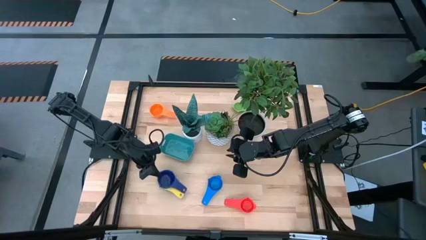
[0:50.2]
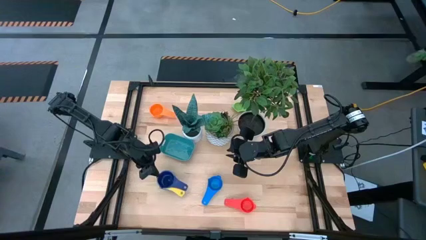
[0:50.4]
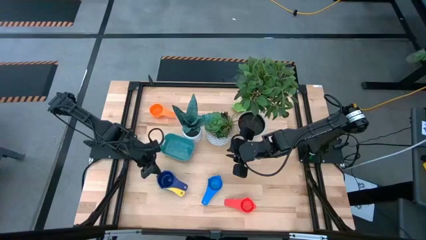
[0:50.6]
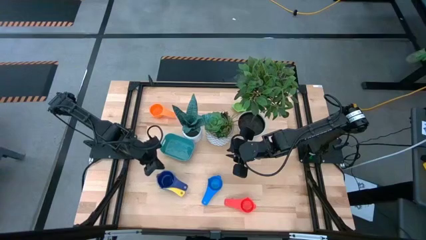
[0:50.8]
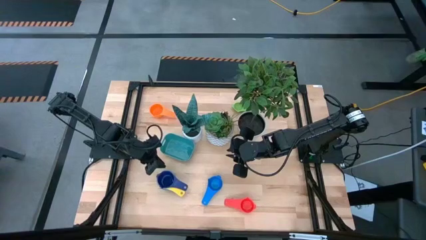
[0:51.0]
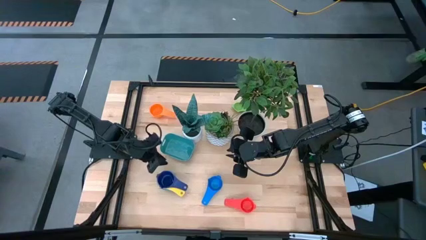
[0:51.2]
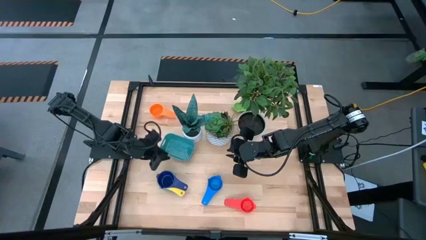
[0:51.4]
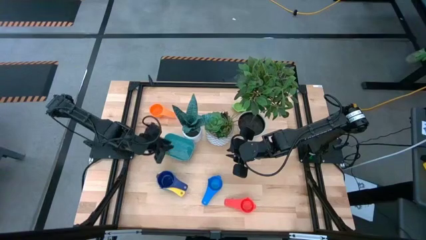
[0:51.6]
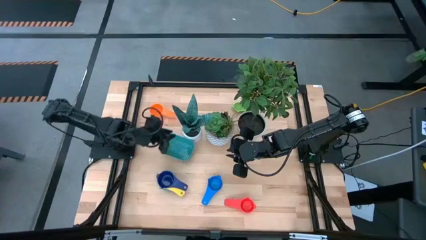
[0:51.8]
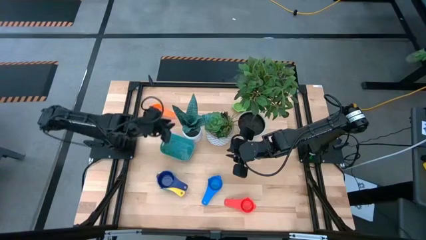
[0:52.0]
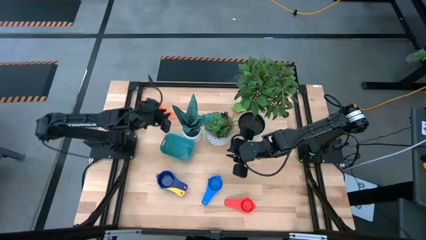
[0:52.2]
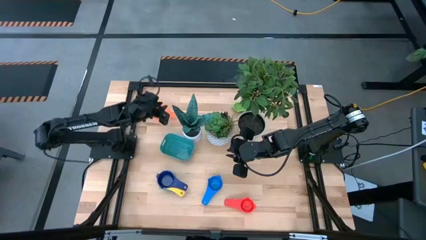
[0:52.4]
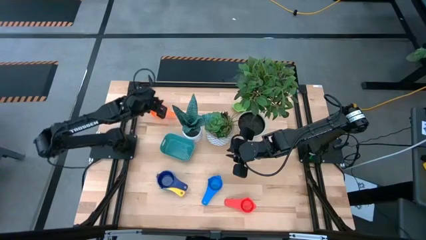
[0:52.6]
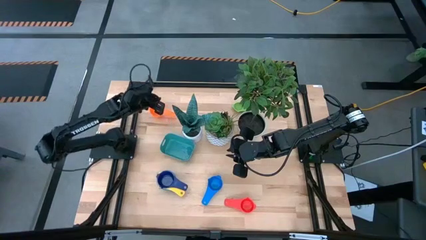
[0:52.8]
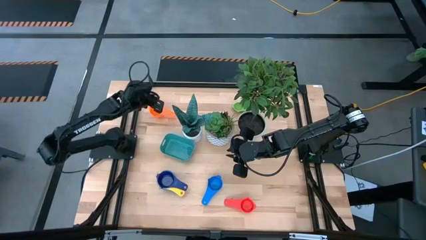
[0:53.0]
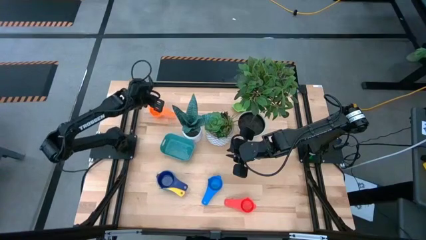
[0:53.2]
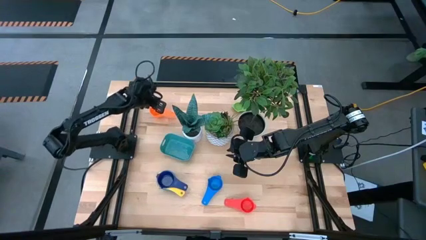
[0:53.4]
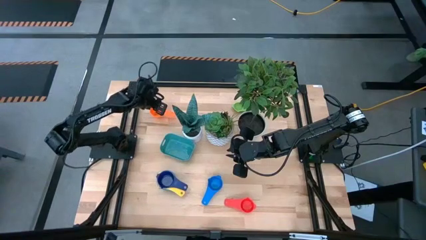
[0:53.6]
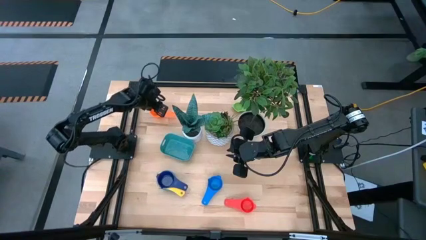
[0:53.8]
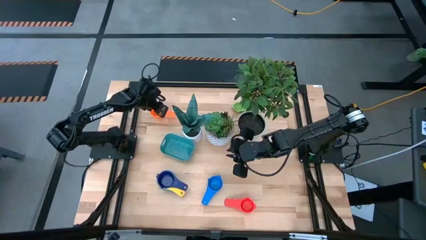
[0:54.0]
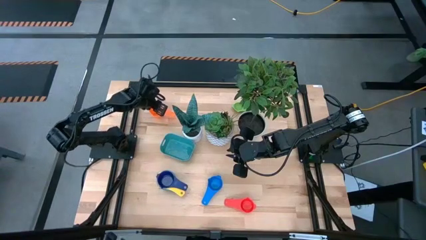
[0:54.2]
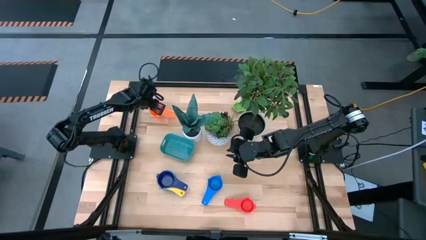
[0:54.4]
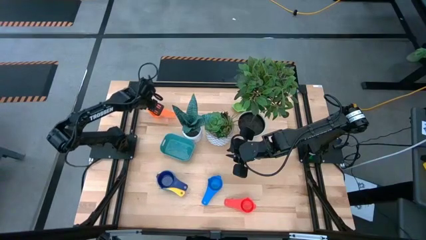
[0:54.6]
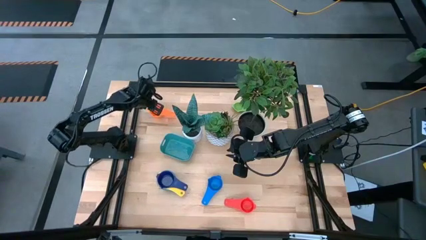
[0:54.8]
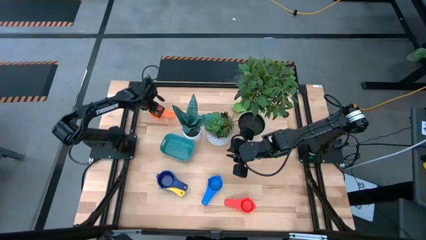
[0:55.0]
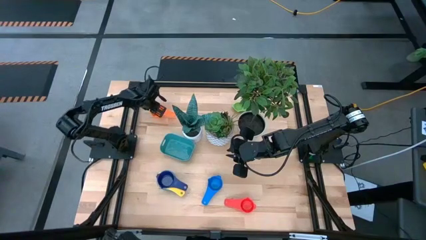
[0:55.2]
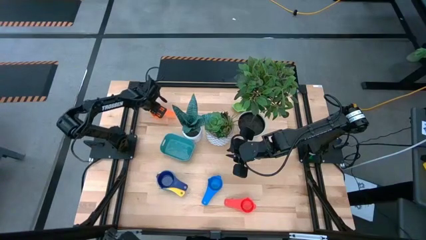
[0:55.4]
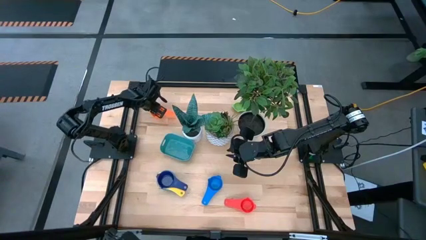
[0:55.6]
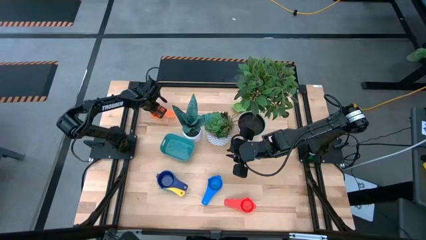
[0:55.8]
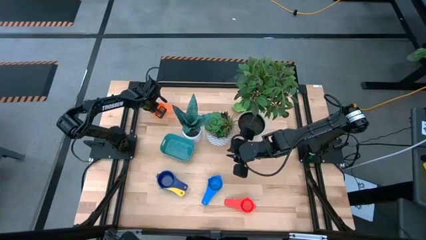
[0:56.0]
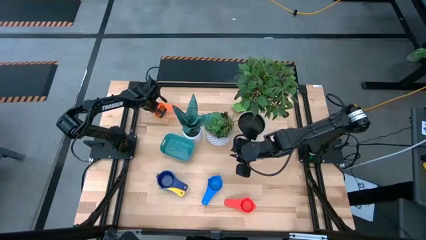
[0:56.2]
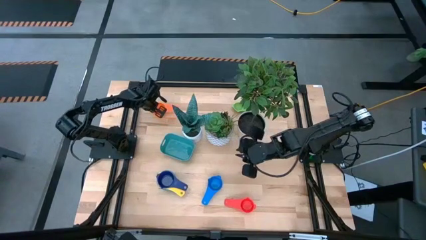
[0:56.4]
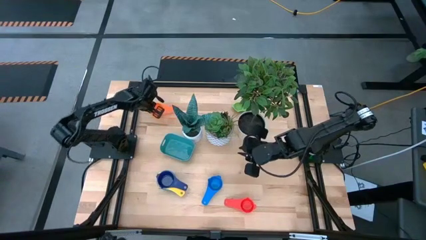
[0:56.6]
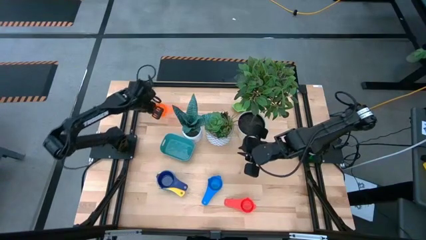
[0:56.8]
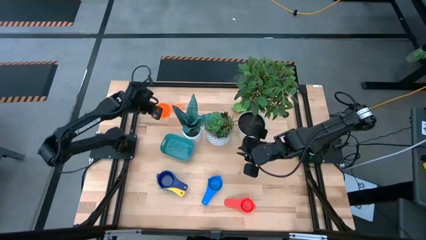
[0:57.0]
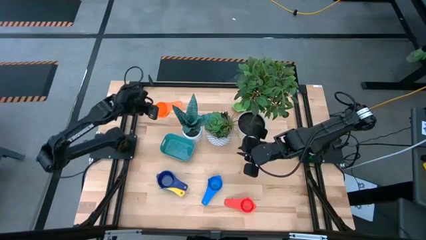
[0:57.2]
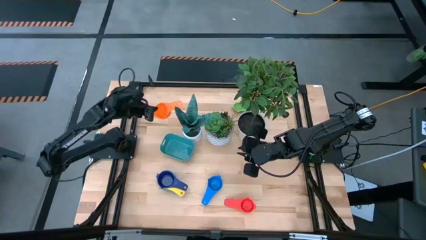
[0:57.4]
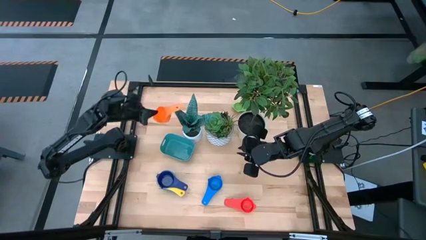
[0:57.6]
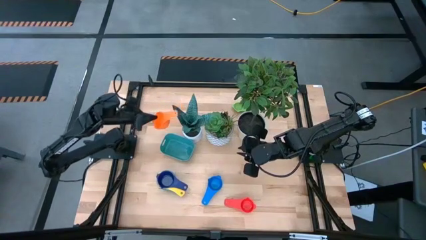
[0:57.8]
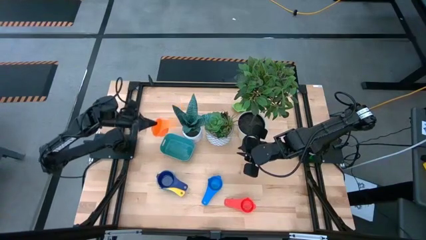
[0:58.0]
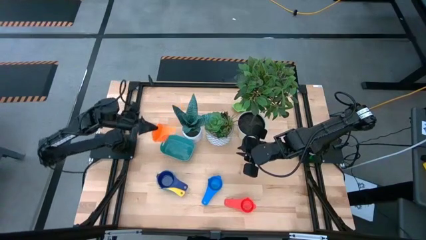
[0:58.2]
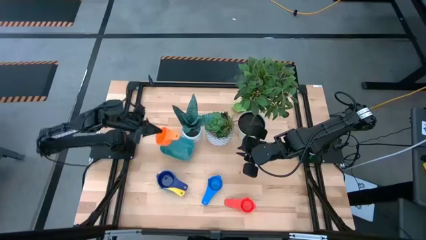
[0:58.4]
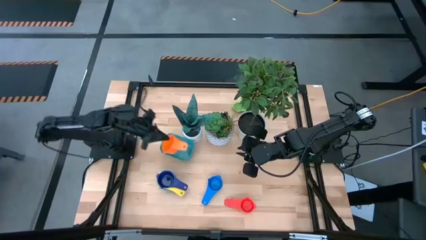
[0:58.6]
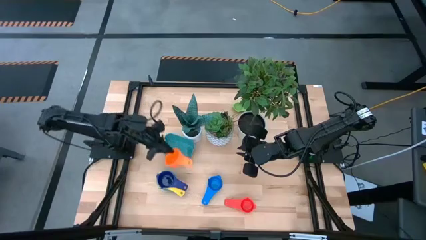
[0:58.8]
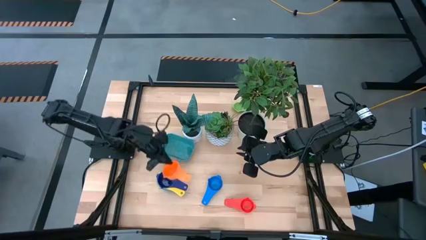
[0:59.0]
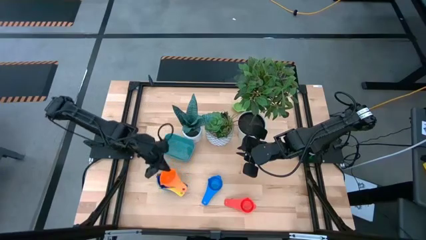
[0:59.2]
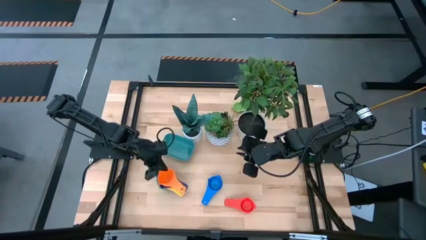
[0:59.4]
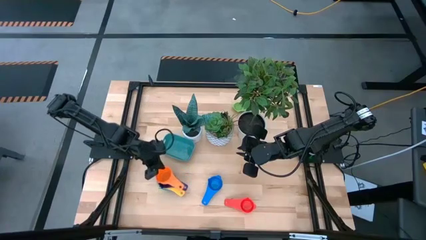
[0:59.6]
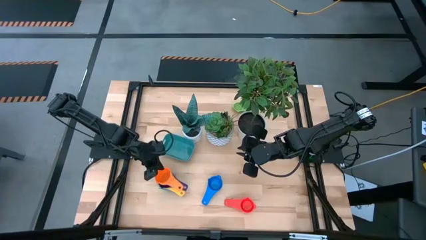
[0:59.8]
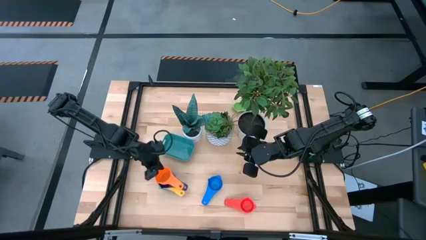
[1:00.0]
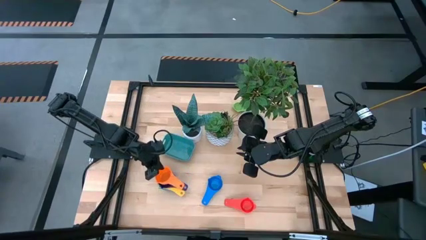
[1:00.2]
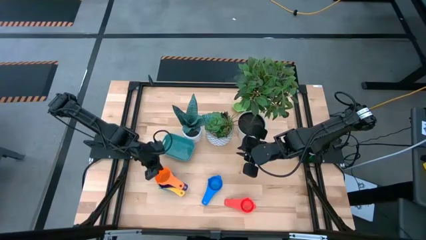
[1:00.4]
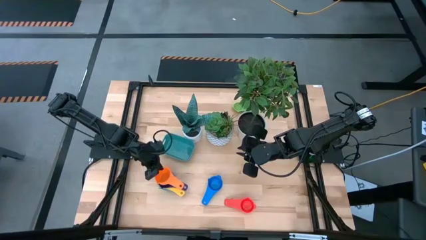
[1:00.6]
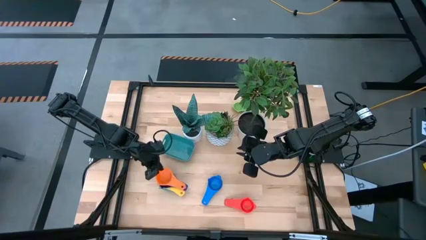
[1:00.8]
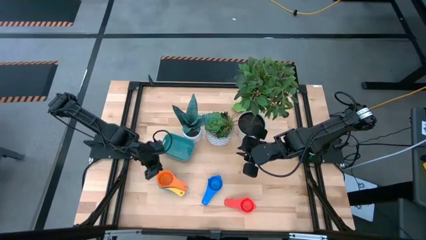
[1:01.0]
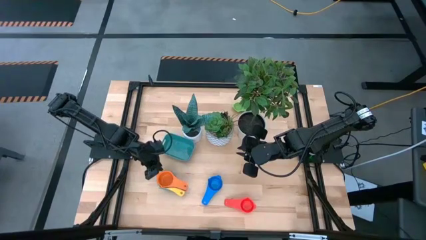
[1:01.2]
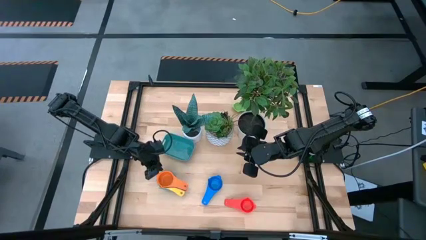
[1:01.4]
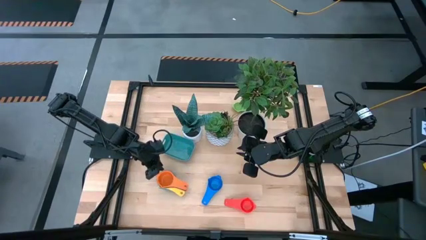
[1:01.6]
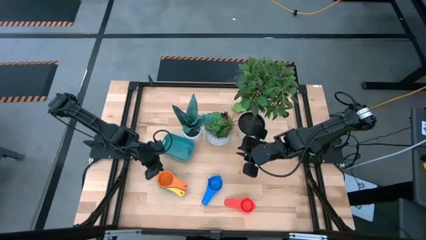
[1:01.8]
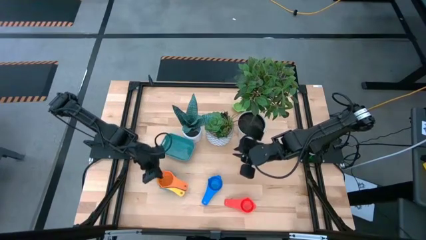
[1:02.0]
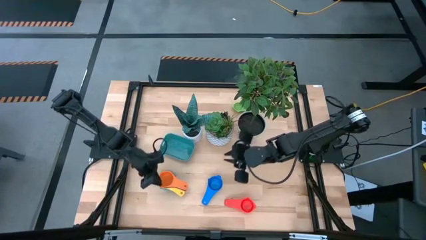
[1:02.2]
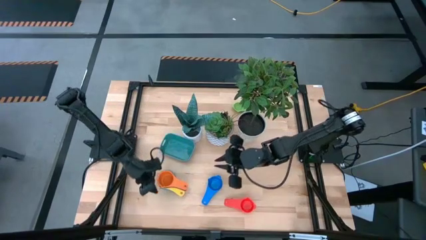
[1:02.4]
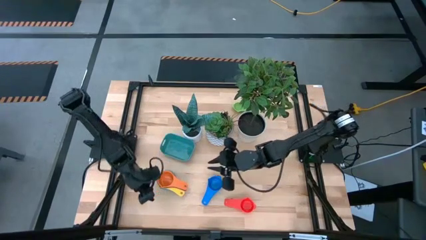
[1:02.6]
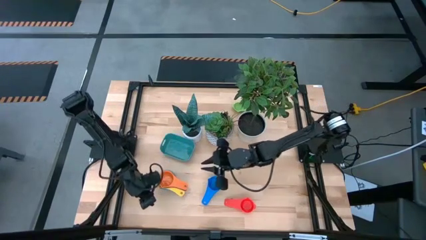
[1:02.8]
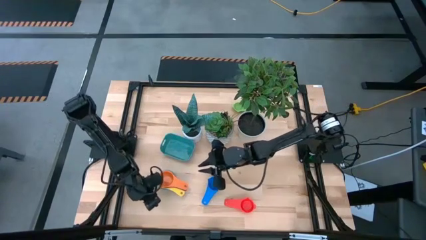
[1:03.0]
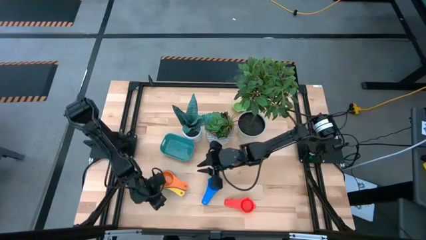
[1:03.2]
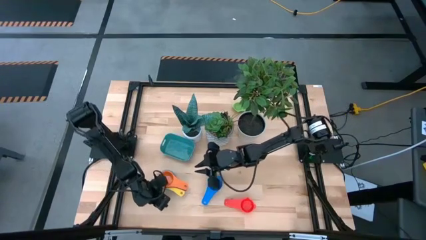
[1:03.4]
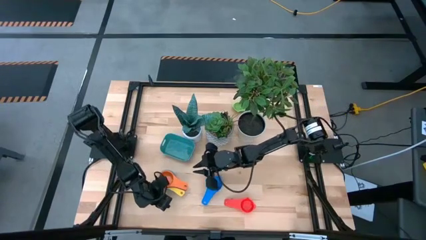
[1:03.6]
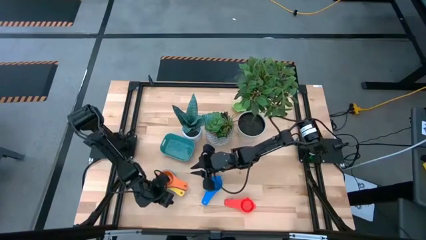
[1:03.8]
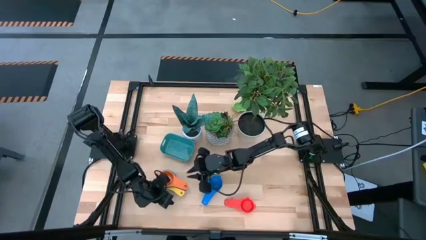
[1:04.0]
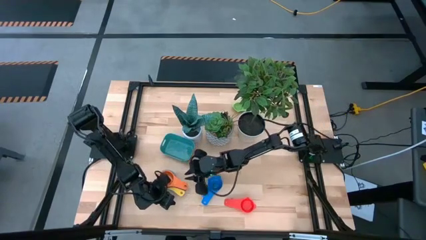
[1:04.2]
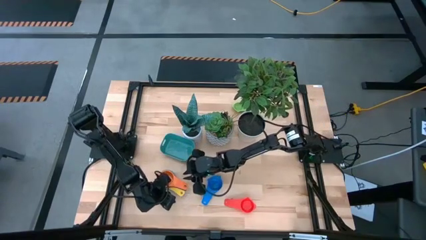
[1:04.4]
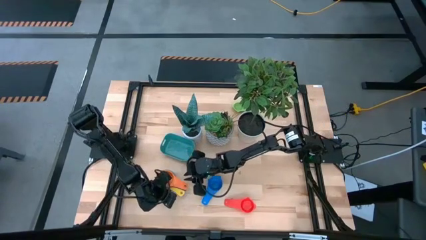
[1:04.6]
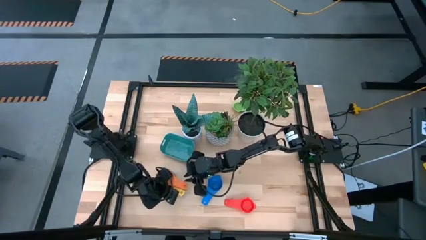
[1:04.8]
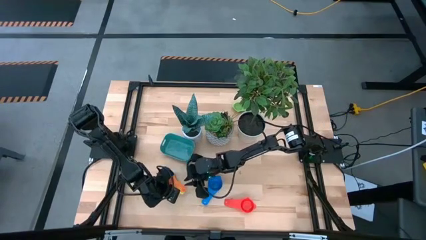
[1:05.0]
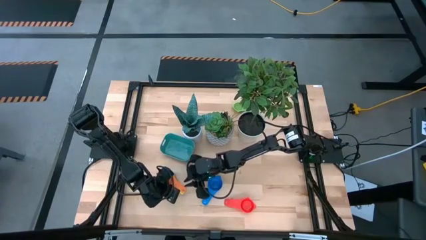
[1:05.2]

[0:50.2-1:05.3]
Task: Nest measuring cups in basket
Stack the orange measuring cup into the violet measuring cup

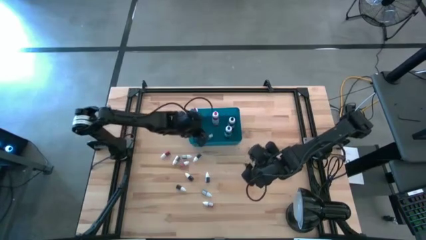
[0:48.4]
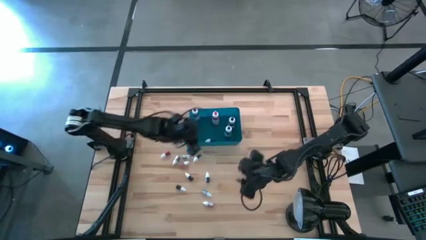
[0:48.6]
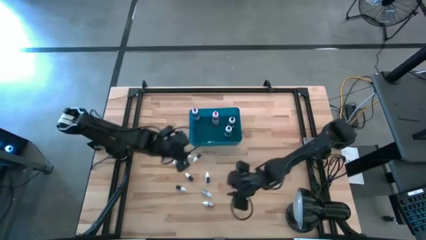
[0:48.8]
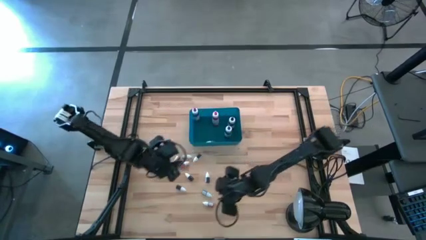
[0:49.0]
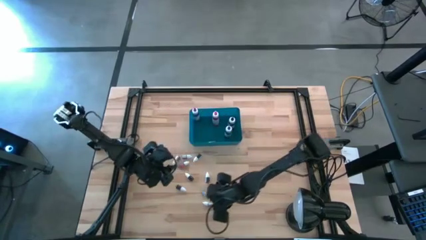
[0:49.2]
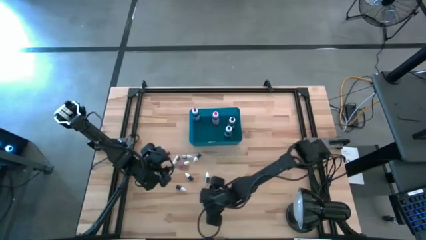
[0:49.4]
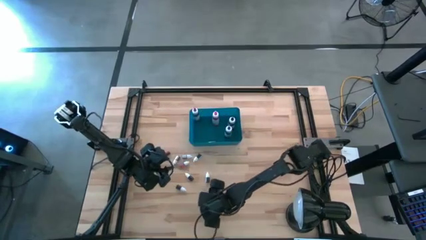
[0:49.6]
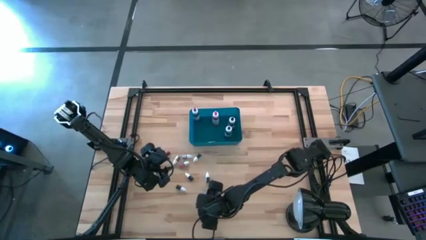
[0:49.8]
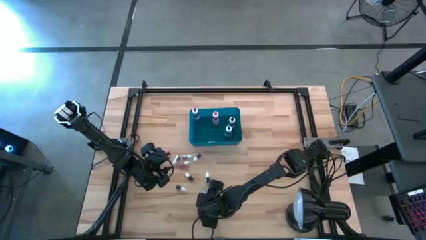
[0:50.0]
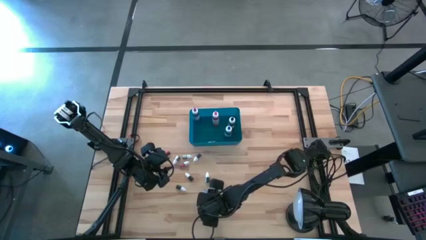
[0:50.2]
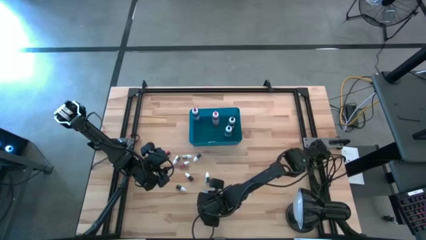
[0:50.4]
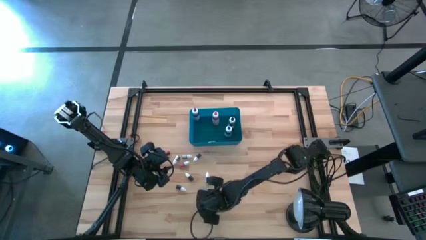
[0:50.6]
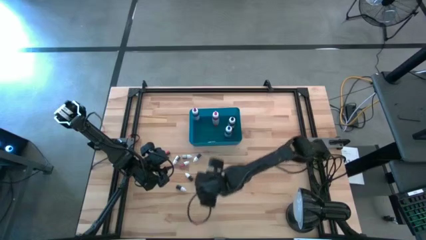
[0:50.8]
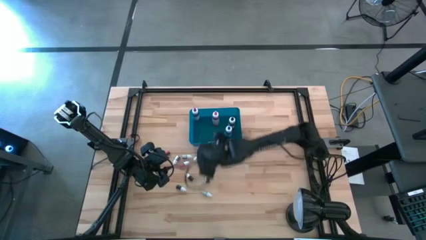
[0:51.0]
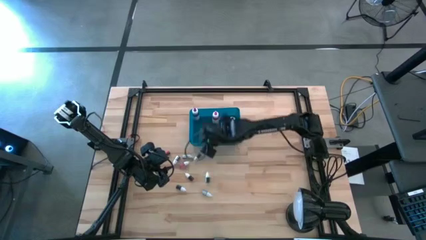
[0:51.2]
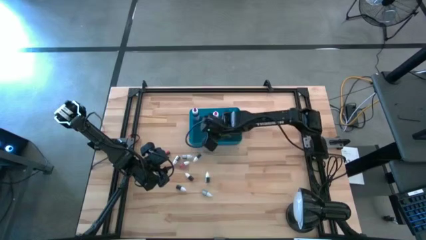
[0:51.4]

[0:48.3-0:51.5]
Task: Pick & Place food coloring
Put the small orange food coloring bottle into the bin
